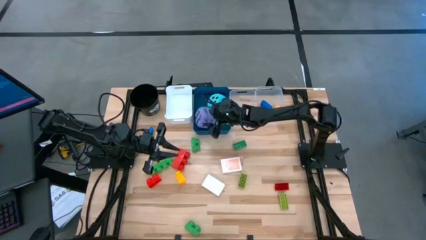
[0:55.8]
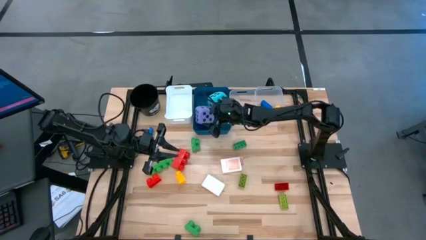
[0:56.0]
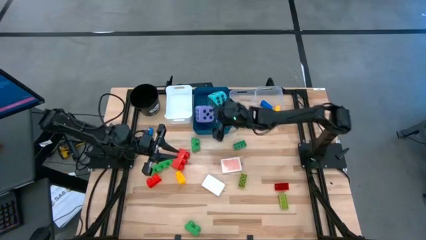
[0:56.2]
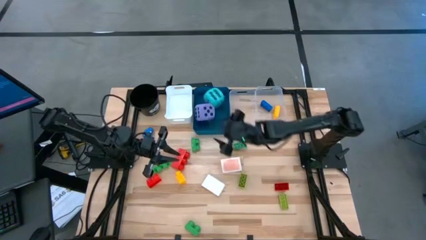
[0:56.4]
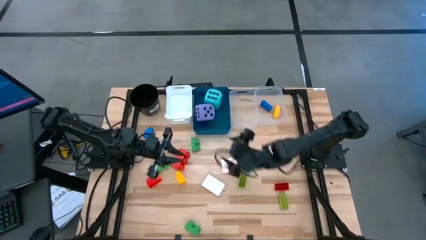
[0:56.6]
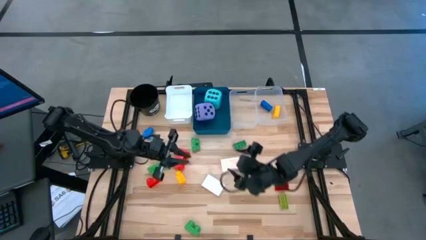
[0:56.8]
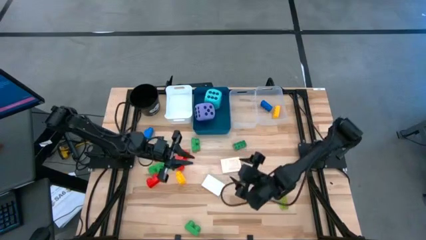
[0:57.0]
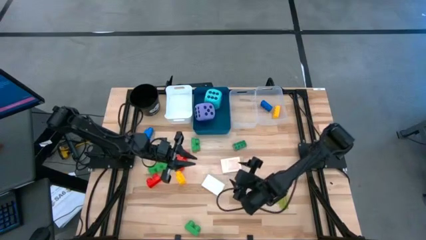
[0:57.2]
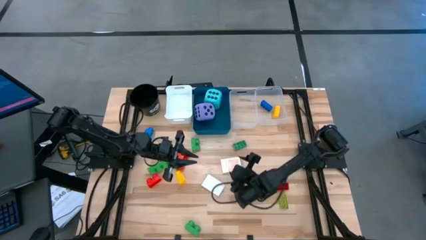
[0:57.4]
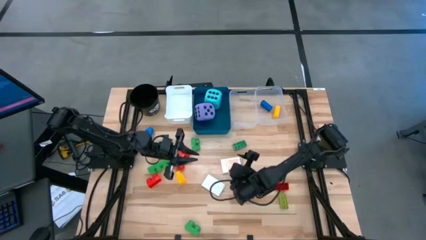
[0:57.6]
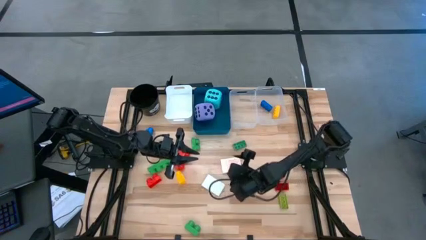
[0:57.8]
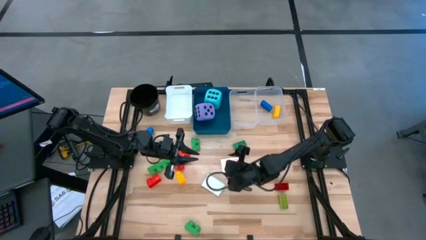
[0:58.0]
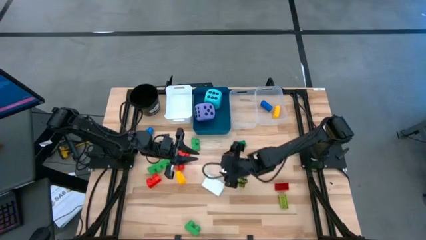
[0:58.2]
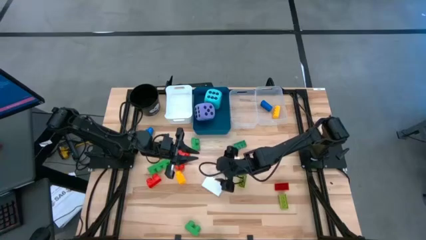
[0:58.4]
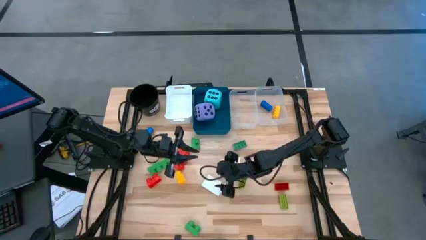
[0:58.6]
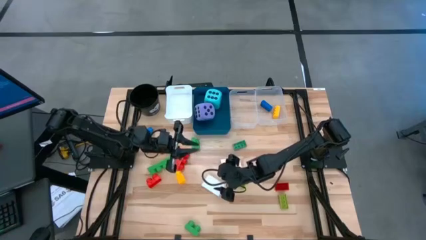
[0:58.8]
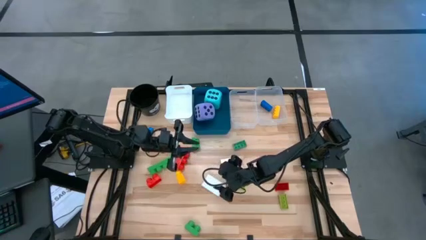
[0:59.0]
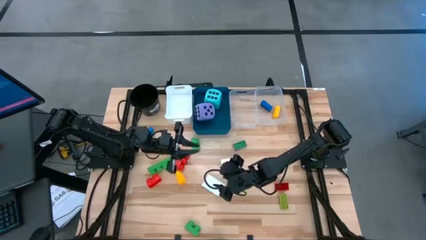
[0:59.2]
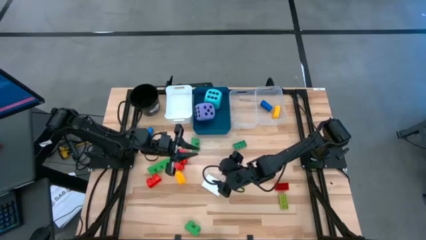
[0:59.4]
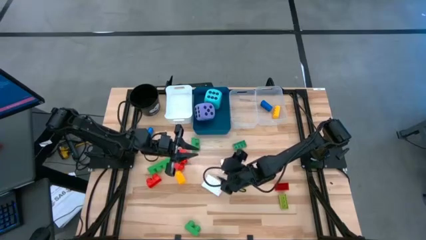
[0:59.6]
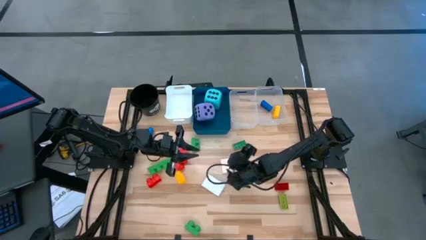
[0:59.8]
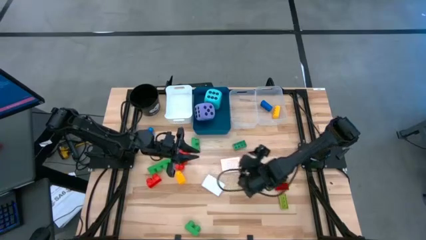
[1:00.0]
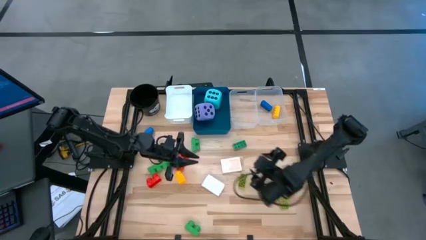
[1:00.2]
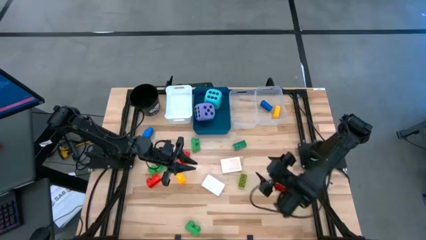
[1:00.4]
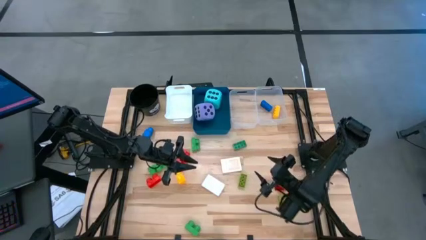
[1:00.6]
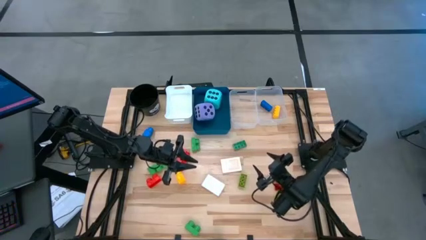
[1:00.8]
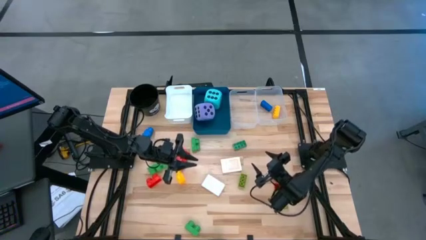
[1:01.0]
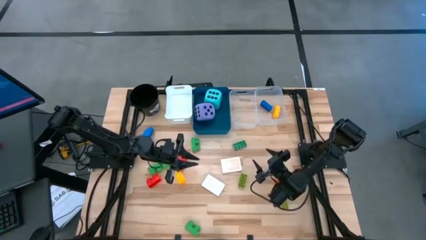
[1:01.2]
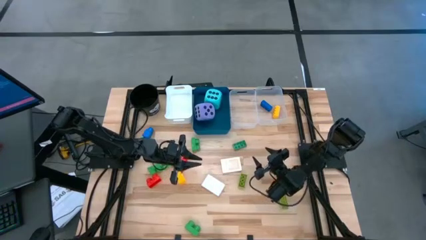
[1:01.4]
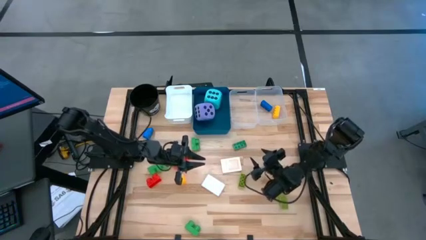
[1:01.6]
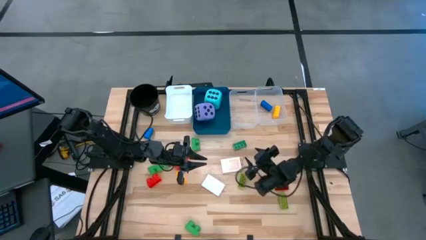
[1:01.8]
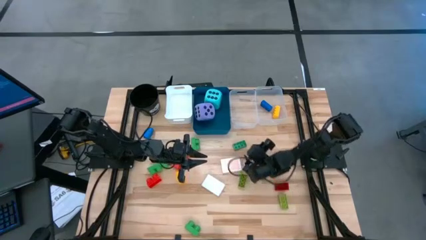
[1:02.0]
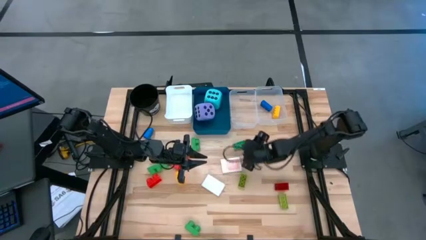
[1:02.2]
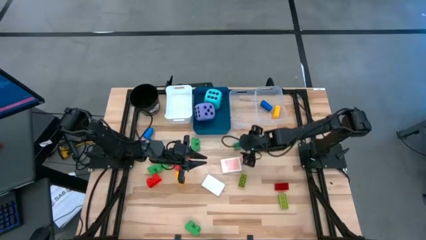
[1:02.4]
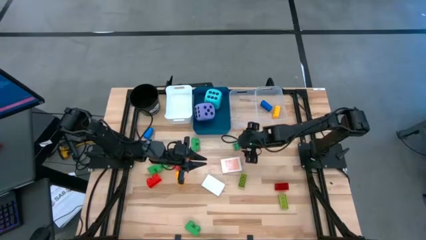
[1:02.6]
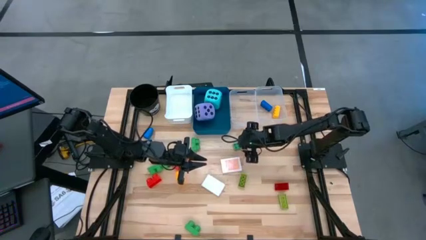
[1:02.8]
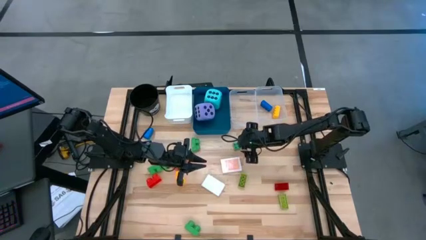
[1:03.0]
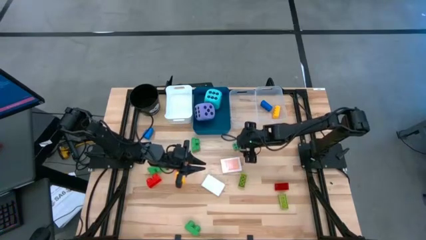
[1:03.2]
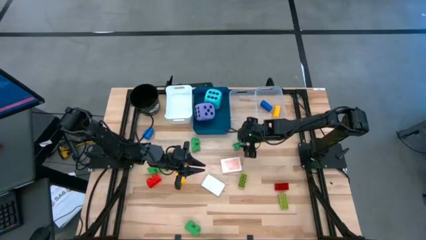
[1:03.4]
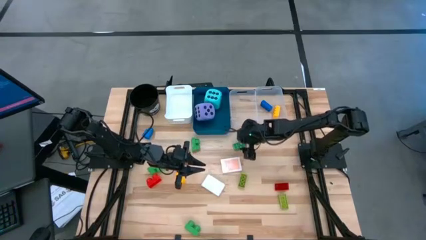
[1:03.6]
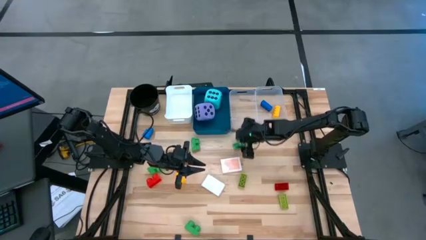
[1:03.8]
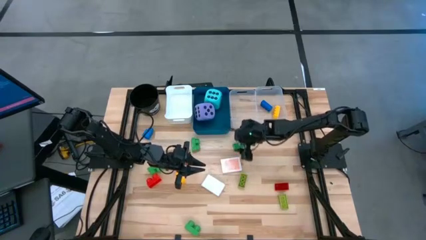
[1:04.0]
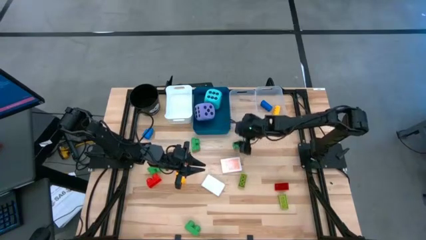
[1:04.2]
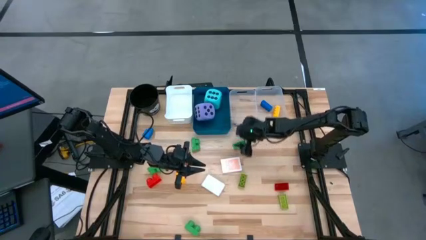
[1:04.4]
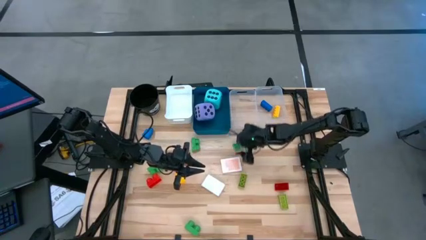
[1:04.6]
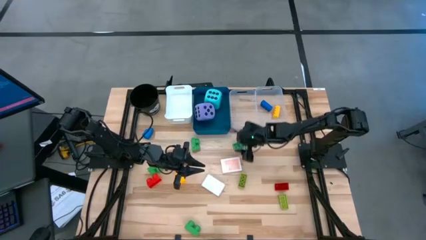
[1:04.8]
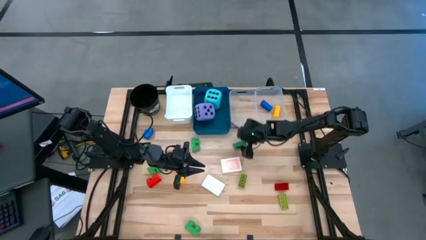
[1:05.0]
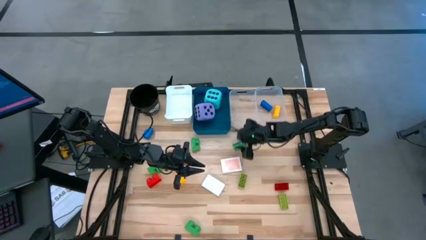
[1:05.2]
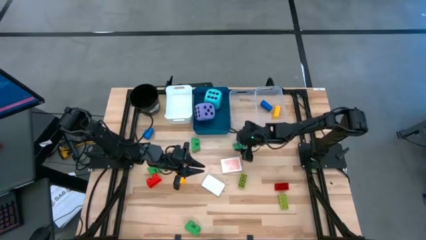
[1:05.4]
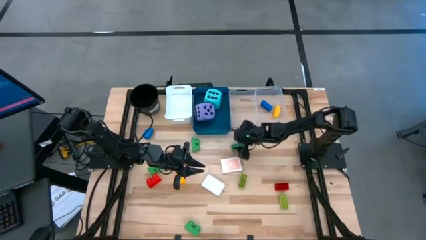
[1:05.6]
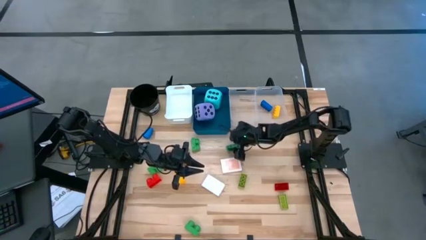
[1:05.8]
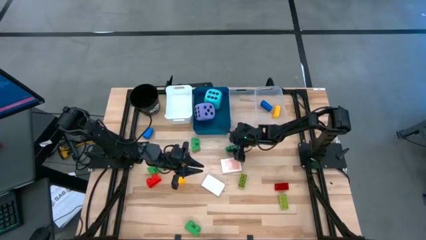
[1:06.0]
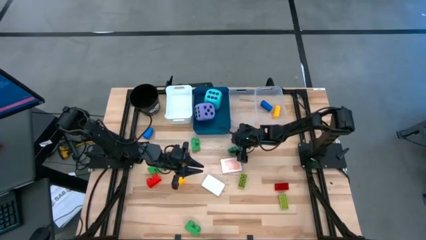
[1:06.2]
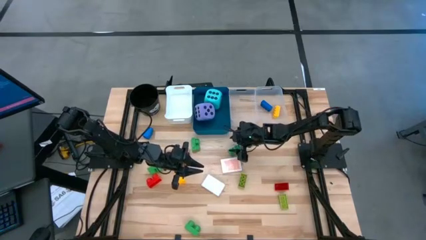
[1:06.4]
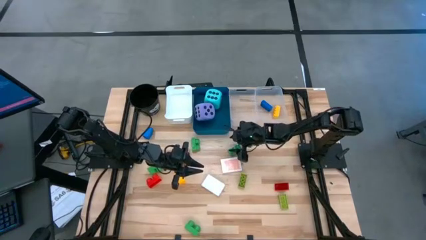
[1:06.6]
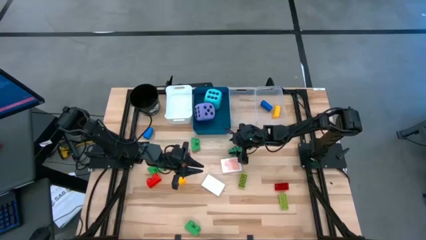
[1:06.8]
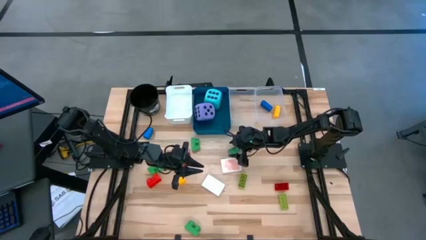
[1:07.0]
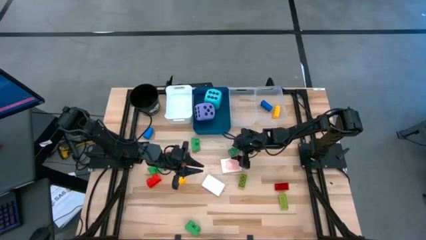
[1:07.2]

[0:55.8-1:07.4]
Task: Pick & Place Toys
Put the small green game piece into the right transparent bin

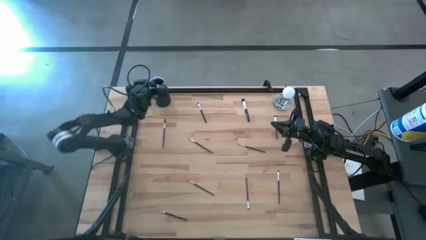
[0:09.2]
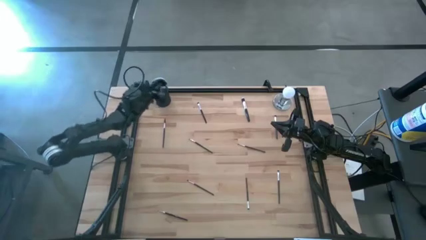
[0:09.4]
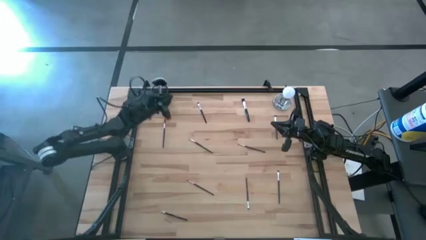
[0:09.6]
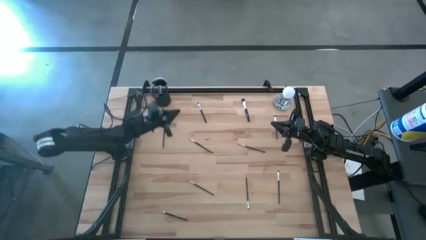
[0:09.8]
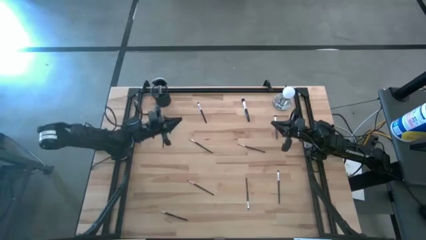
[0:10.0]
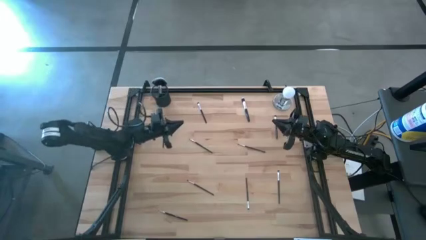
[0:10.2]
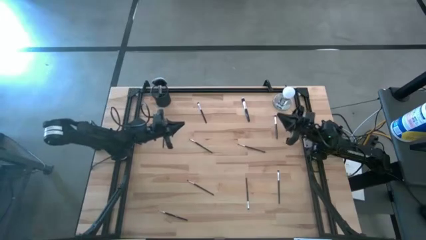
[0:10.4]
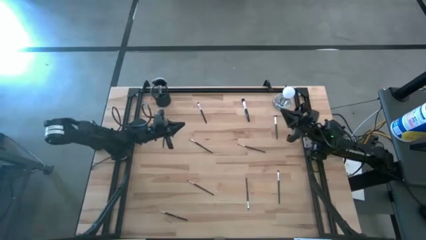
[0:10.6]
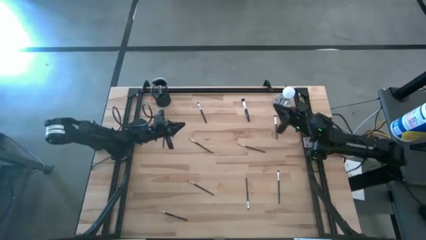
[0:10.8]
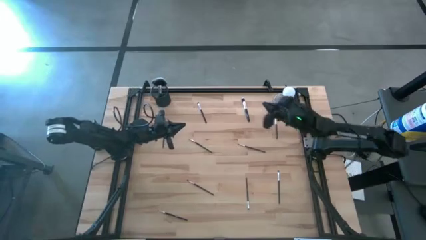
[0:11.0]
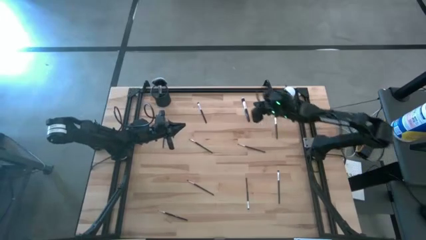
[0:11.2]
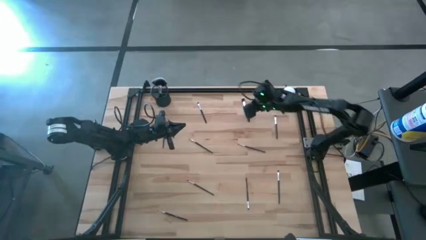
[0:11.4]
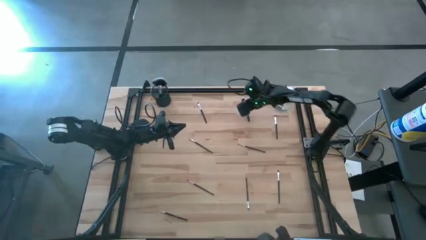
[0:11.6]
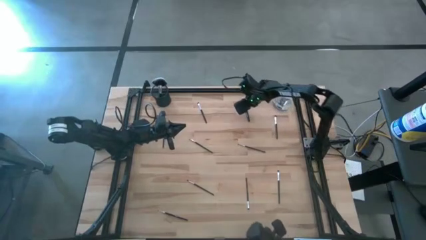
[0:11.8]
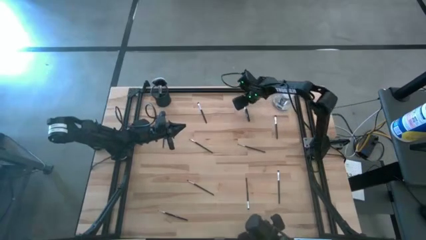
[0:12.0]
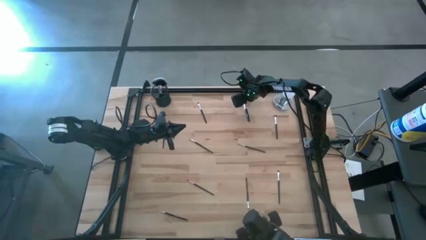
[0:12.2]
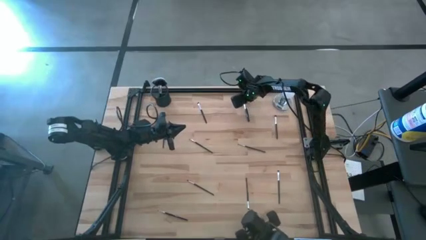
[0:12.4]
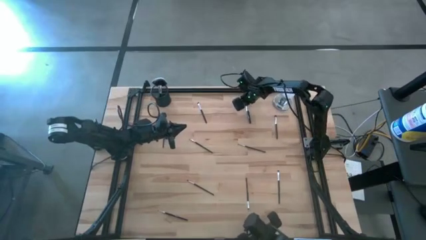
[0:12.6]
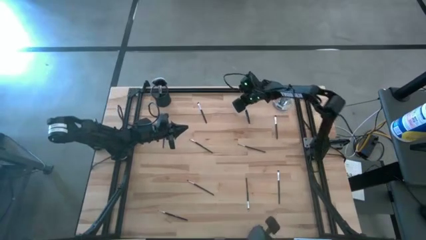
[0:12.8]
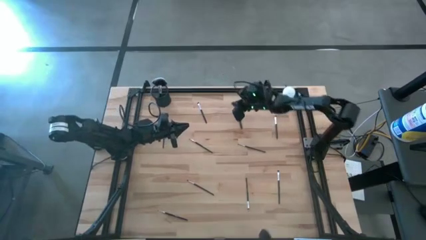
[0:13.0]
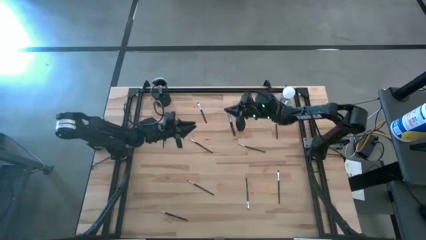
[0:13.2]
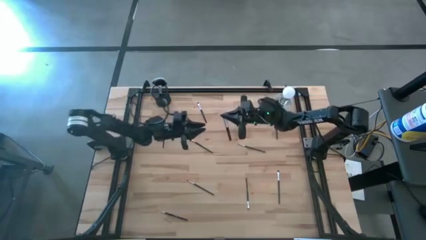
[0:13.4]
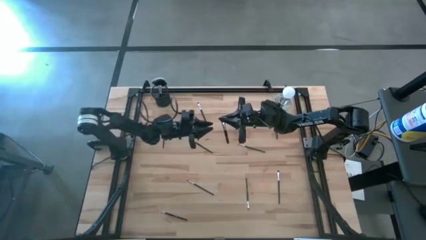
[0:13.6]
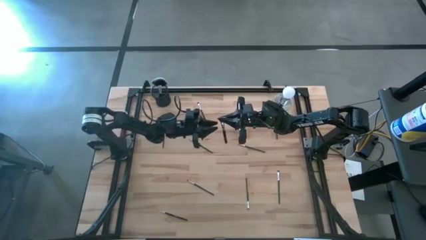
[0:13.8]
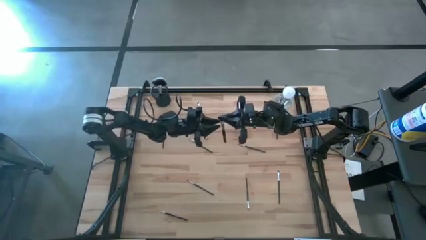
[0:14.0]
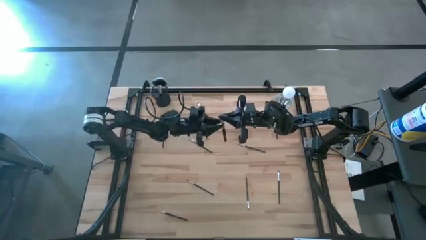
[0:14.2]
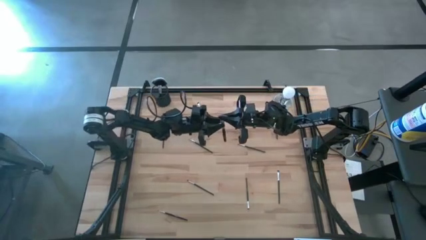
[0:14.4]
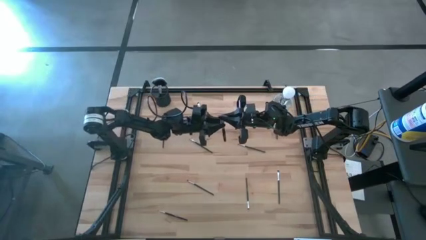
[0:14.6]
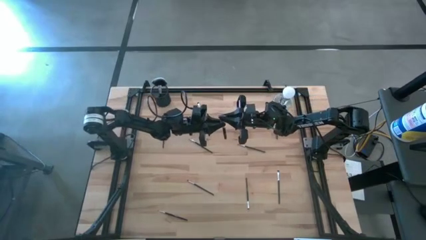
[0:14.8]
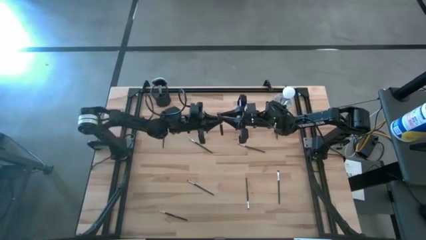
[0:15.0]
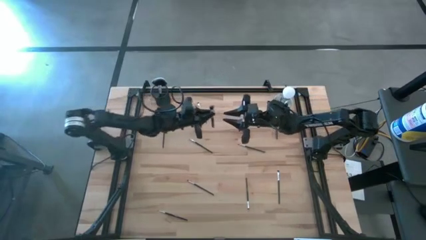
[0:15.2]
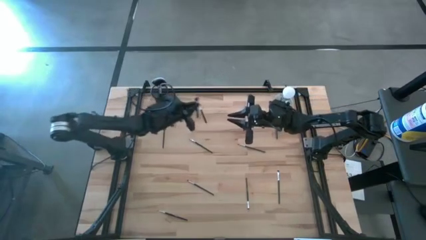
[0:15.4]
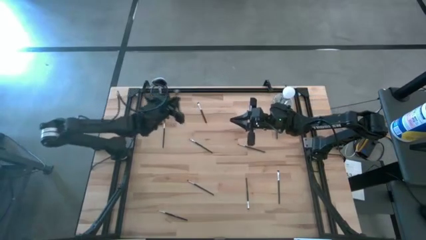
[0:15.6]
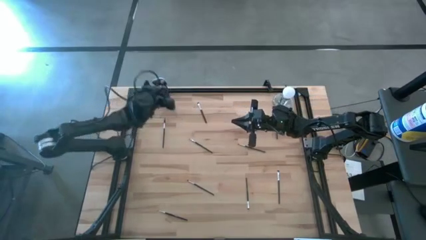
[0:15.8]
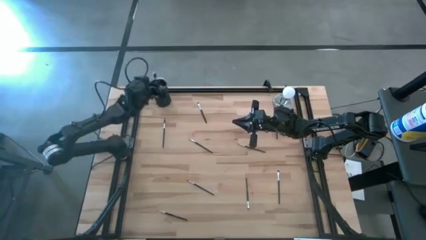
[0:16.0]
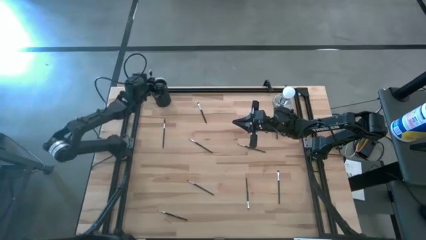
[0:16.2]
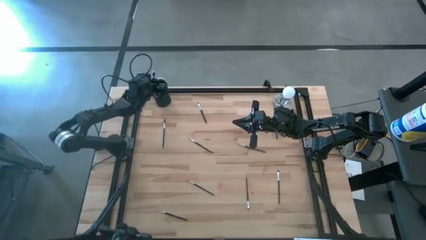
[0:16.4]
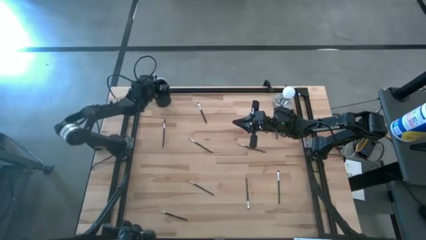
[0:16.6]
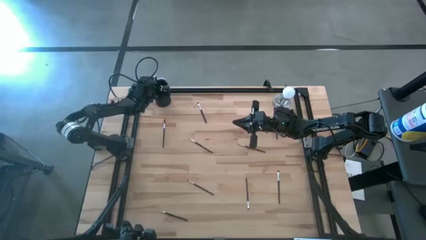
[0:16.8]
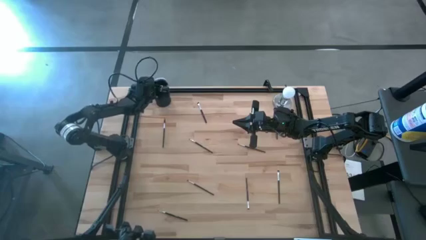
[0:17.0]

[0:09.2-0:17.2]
Task: Put items in baskets/containers
Put the foundation brush into the pen holder
